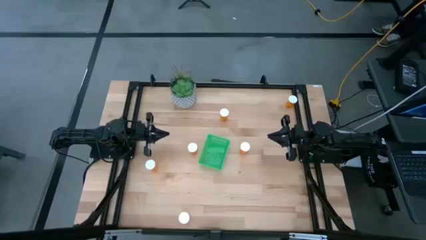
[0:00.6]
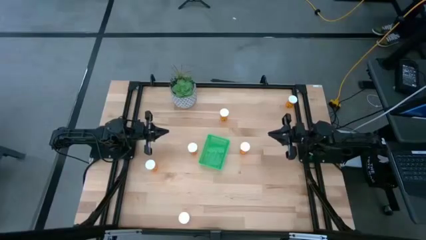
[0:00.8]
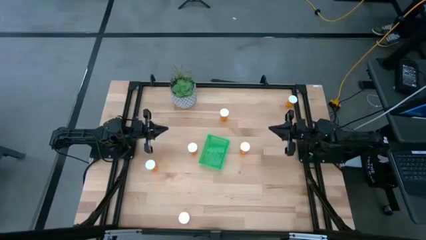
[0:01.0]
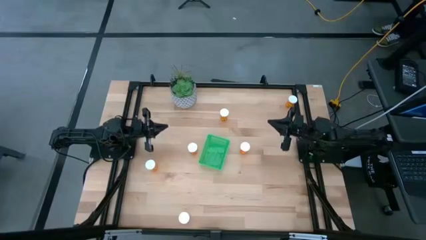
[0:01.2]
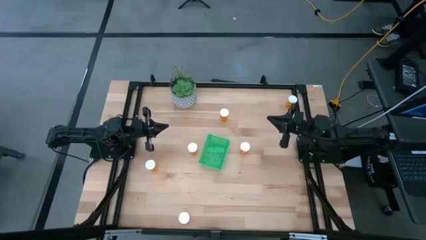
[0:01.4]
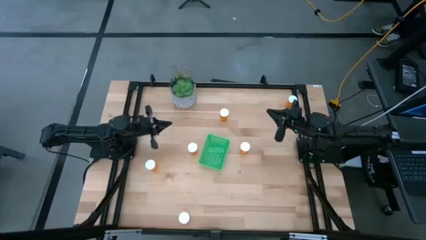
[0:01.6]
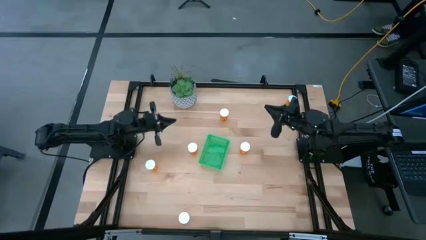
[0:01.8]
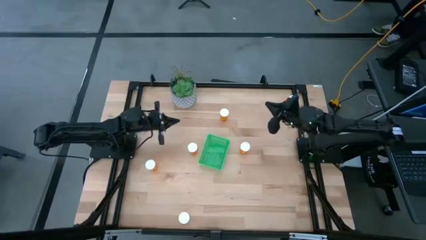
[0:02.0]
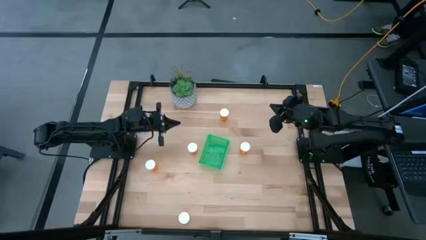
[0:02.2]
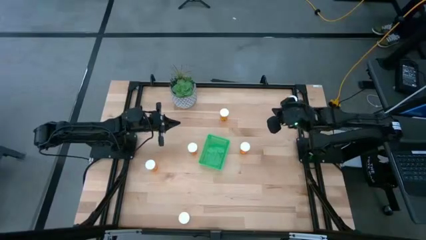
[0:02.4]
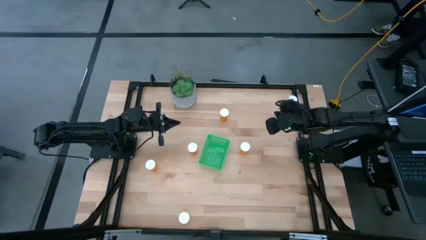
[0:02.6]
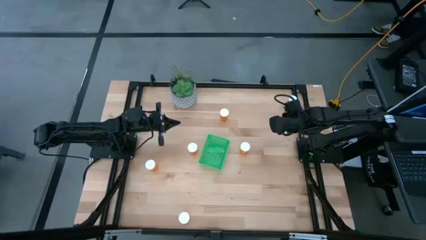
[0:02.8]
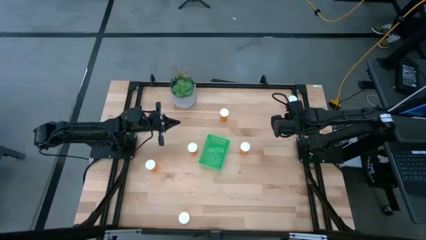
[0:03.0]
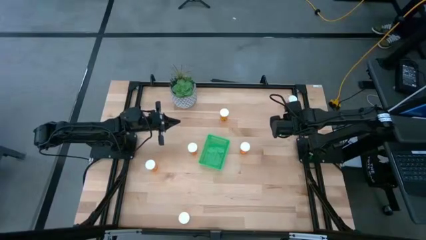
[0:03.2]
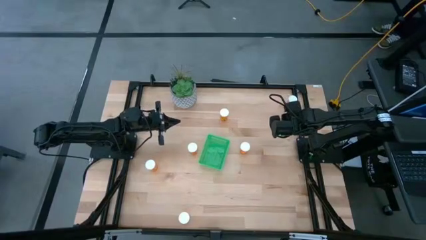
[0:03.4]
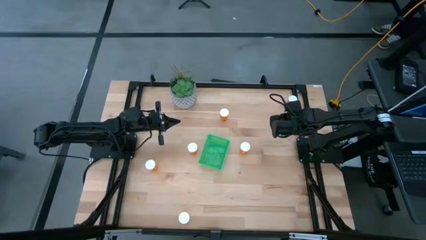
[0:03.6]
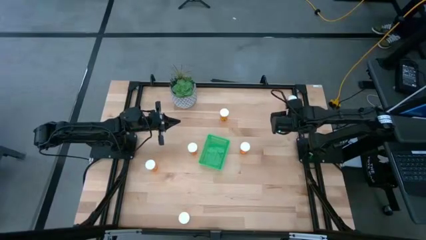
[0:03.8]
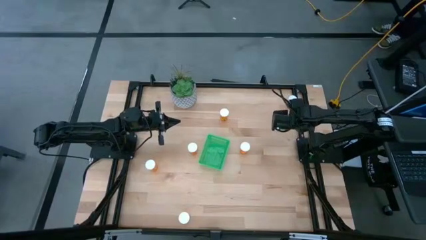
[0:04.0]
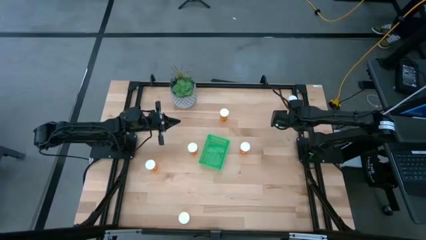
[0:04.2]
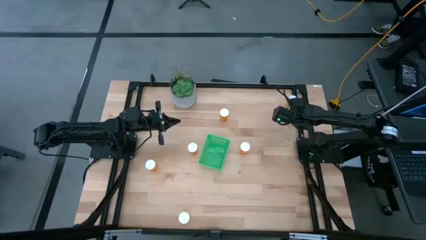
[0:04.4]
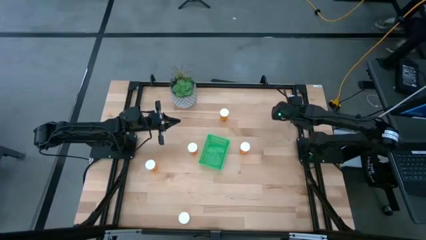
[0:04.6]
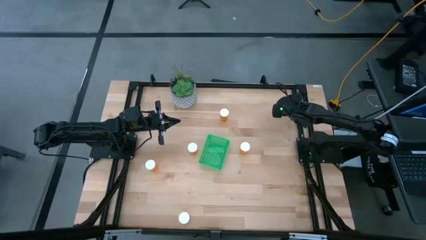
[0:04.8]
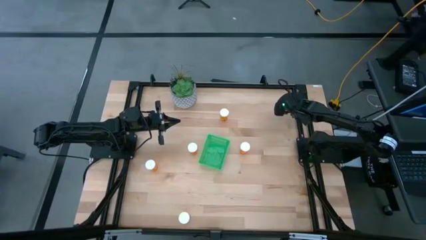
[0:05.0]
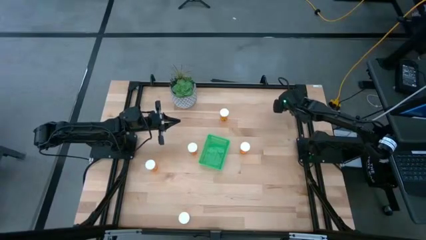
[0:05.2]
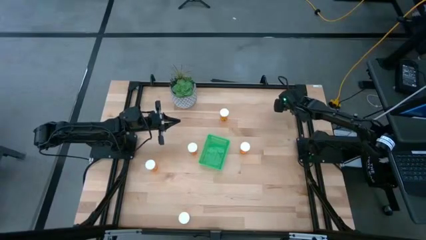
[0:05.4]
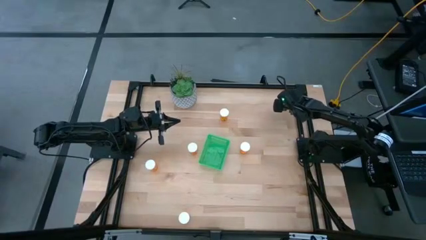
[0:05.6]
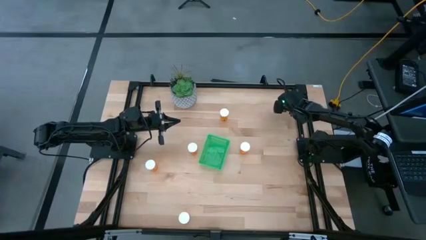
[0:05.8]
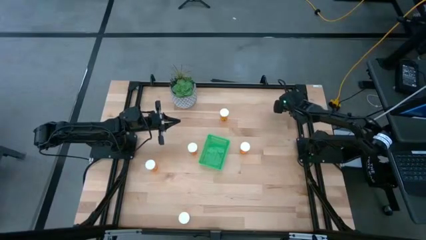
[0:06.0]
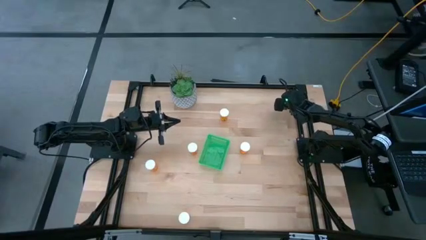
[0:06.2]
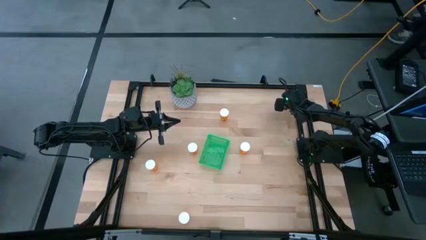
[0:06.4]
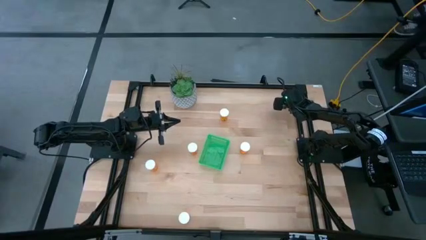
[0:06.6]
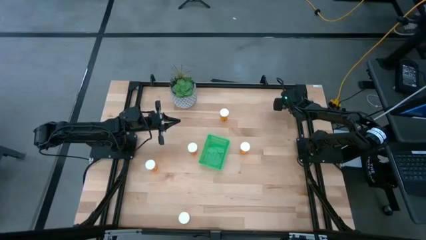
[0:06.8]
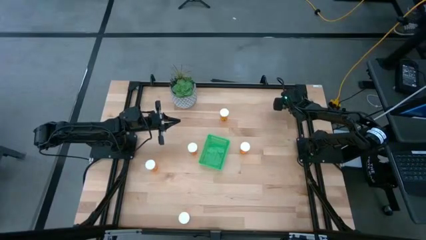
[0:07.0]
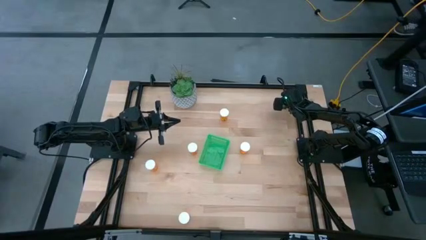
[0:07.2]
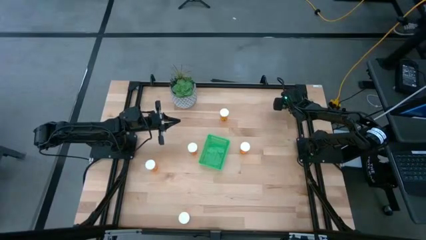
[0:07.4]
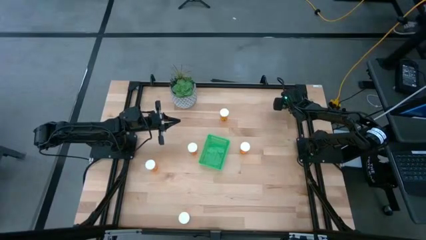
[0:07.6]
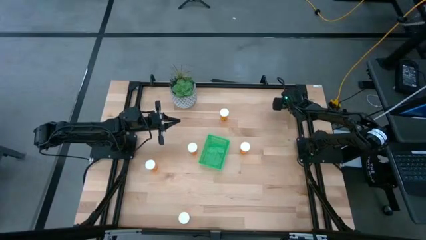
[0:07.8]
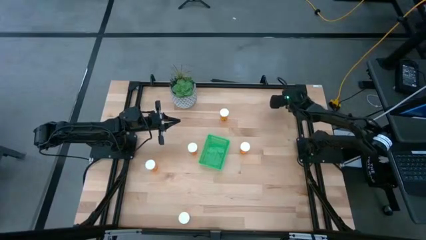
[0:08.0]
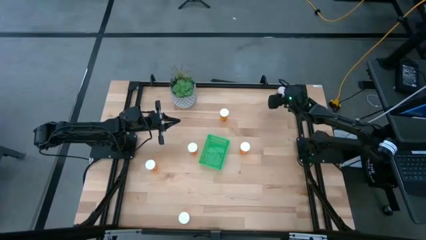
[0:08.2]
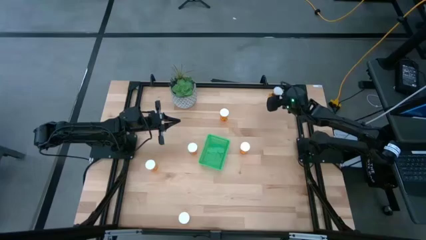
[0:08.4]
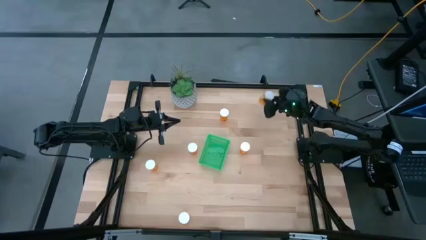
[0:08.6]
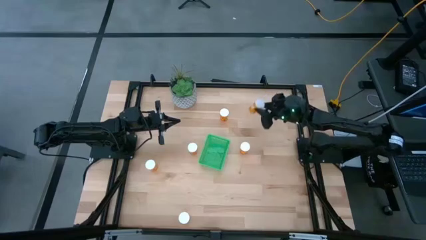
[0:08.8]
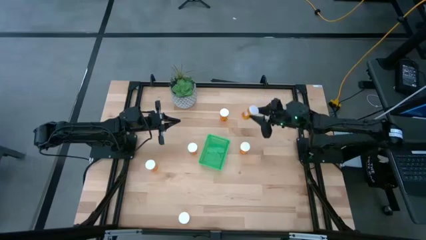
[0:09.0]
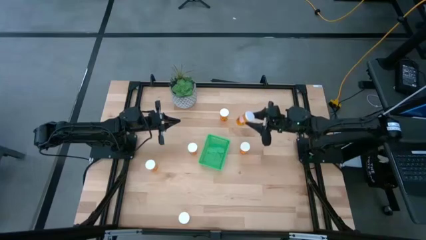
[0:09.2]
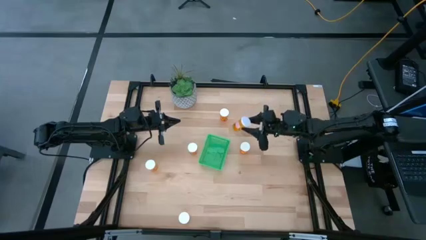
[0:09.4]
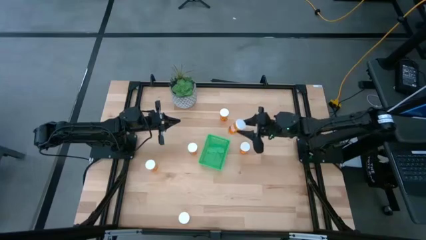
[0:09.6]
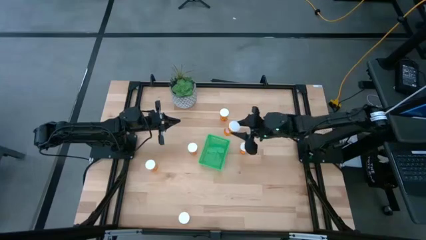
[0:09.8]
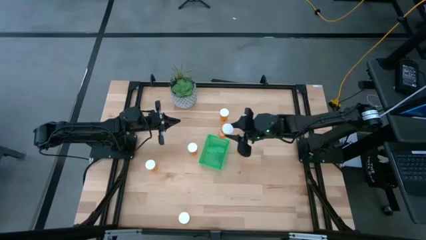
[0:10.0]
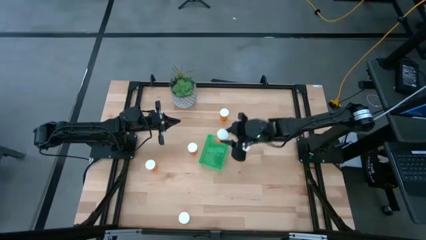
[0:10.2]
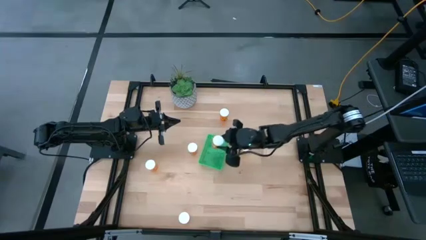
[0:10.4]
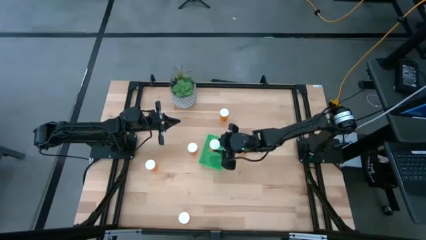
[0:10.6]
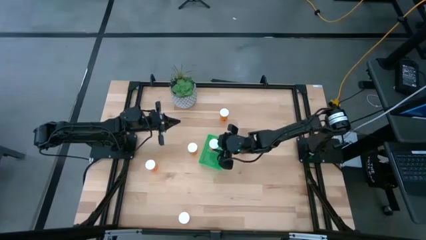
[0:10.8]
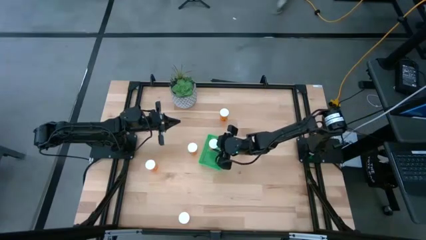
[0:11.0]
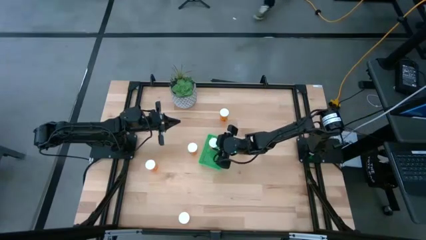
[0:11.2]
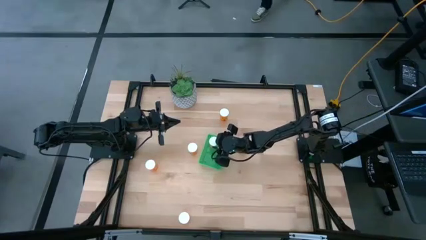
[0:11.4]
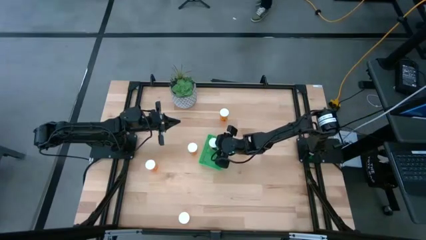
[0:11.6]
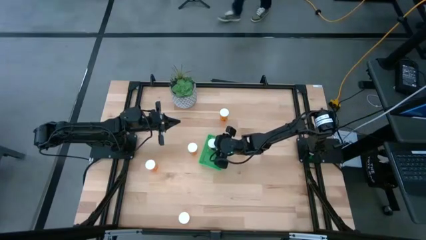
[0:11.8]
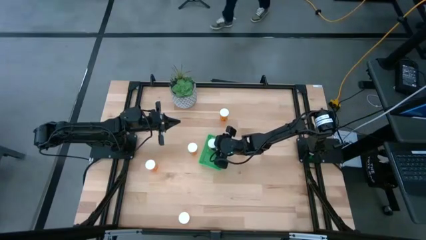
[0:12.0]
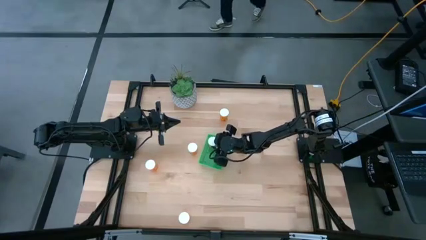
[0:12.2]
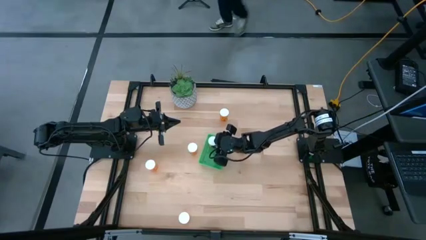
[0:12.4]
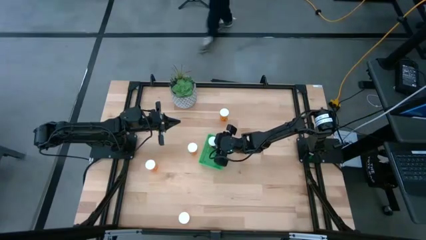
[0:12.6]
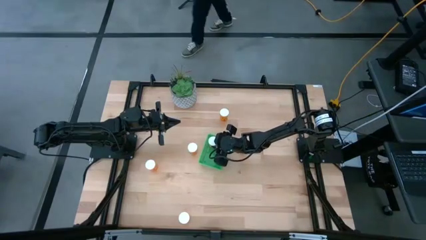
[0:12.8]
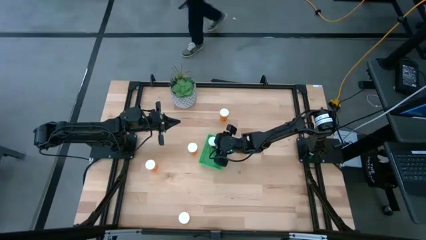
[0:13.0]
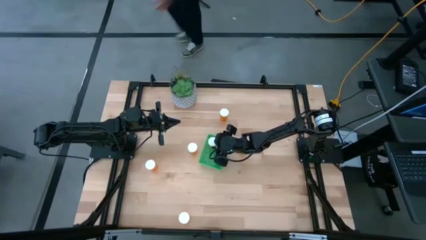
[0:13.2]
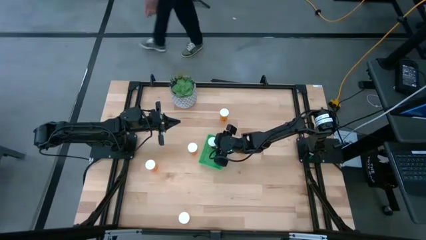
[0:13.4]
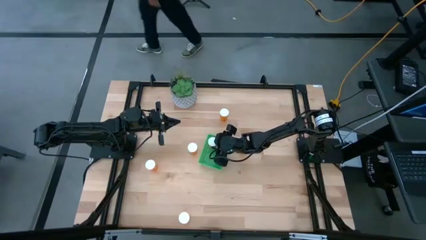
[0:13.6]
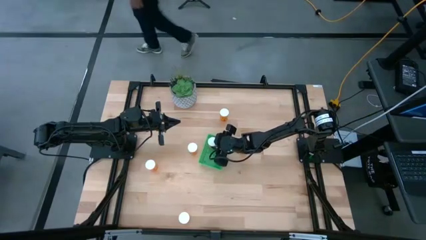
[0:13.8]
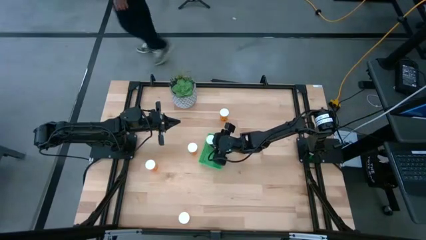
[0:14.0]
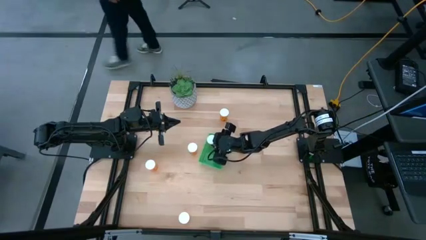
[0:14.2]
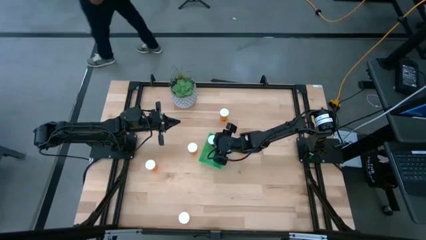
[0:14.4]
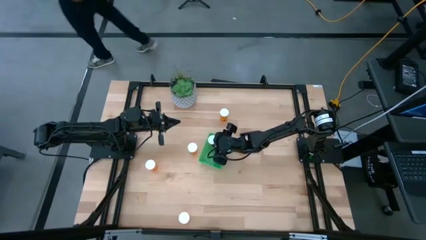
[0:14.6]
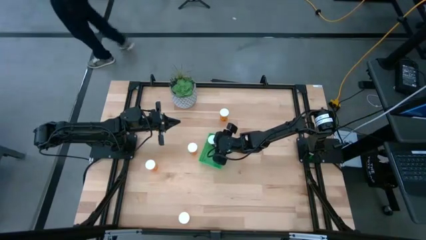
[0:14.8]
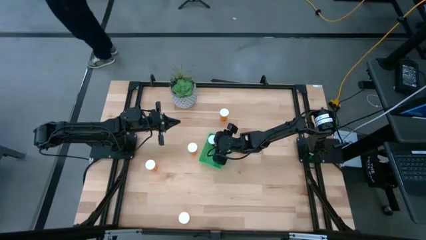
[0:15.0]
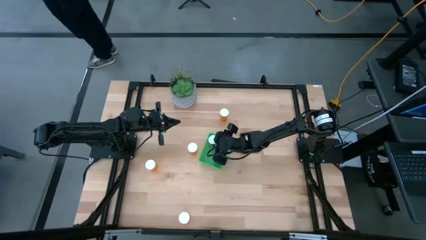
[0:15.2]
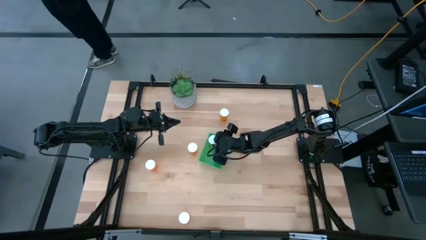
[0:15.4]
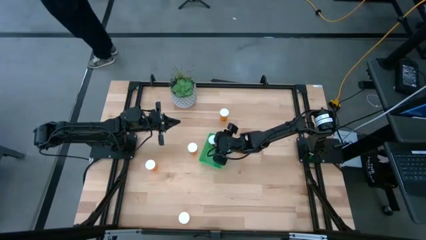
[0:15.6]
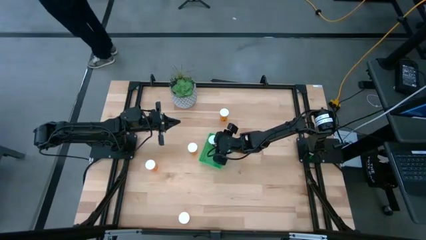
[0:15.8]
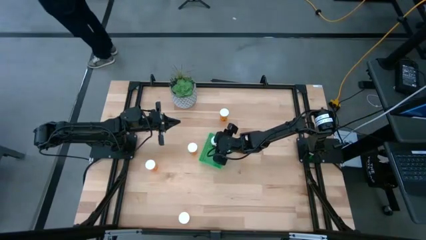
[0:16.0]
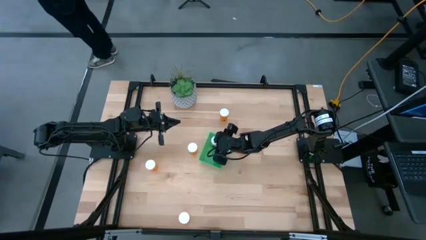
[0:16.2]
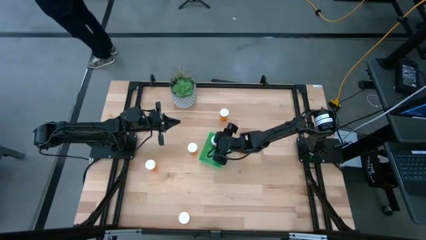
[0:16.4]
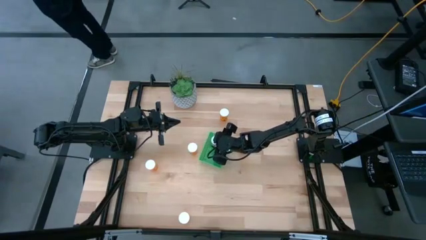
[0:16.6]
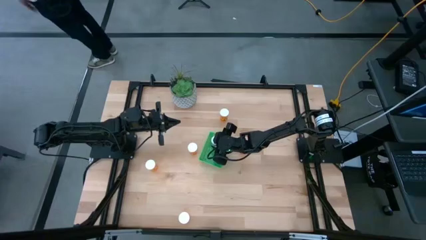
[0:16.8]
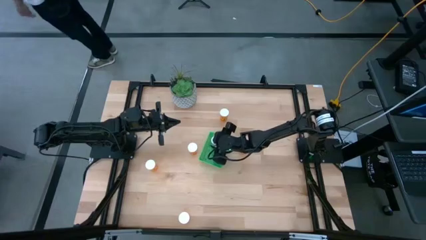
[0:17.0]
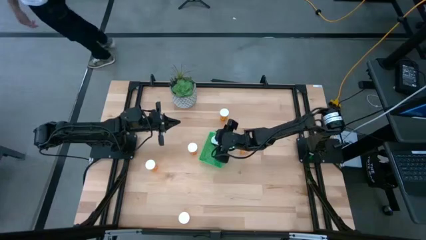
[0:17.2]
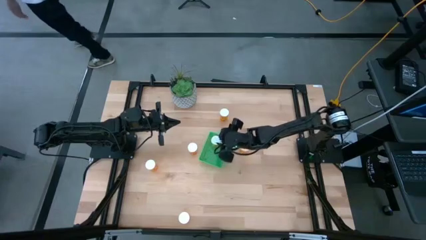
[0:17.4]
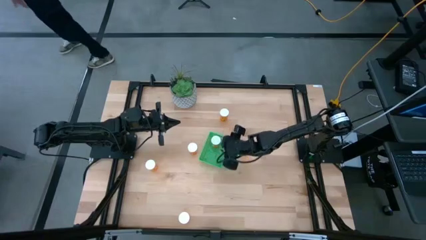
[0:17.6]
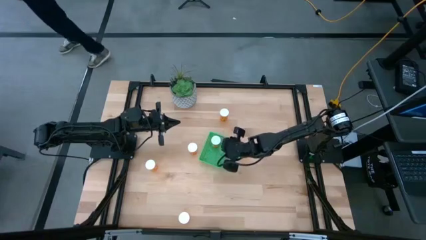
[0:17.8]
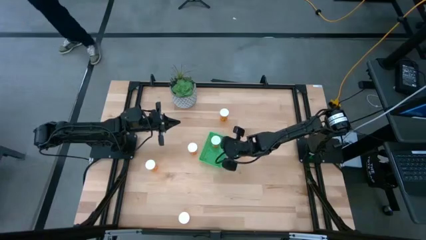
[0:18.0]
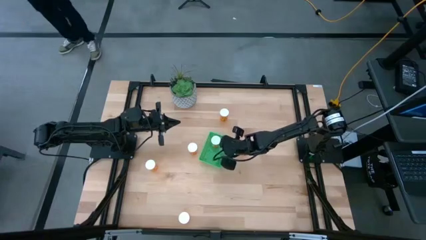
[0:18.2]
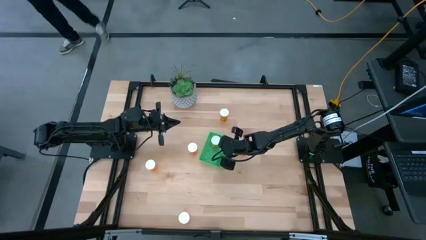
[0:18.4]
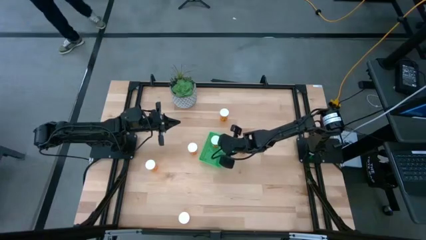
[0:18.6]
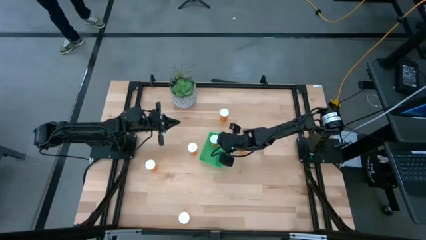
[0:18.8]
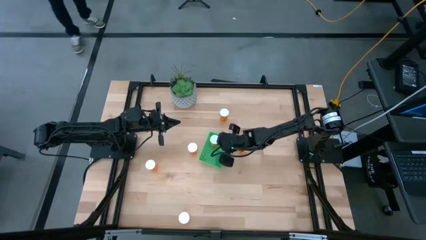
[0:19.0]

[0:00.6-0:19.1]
Task: Pick and place pill bottles into a basket
Put the orange pill bottle into the green basket
